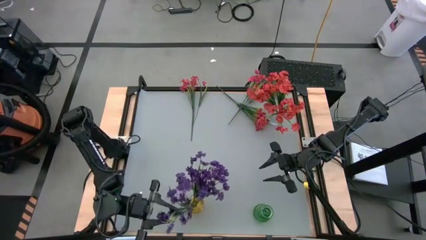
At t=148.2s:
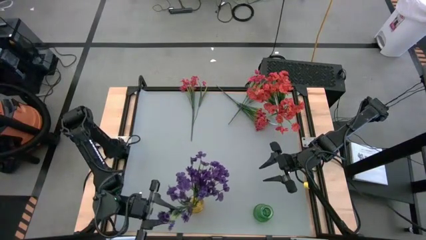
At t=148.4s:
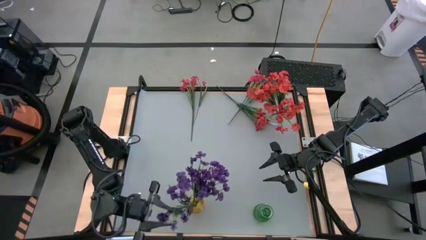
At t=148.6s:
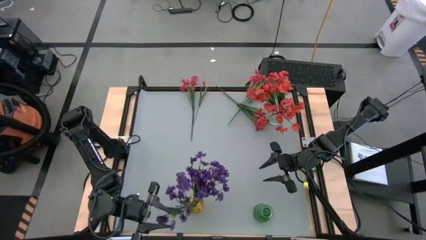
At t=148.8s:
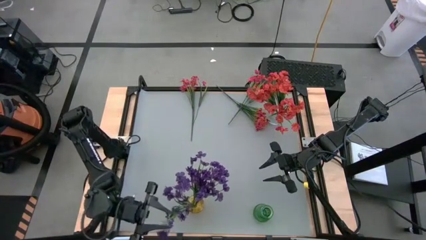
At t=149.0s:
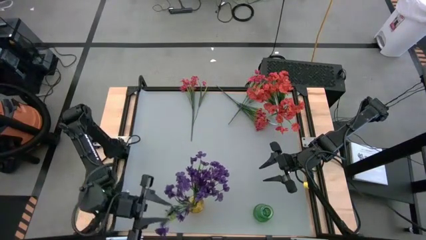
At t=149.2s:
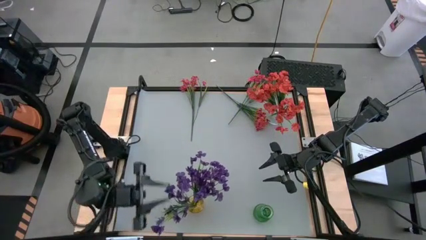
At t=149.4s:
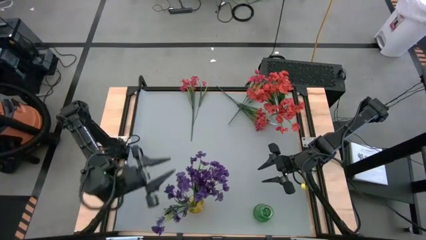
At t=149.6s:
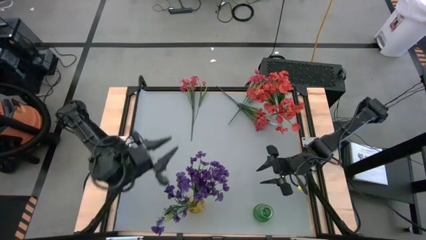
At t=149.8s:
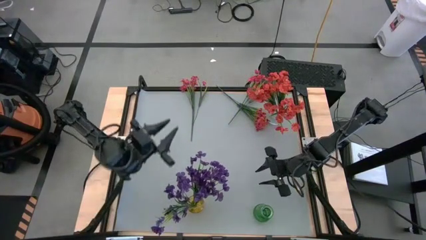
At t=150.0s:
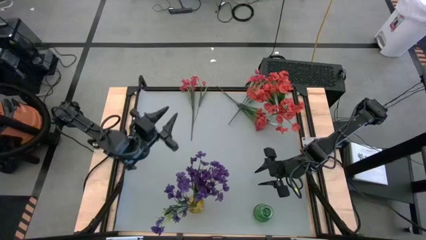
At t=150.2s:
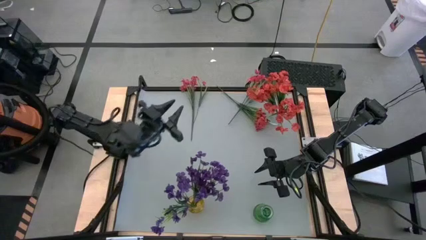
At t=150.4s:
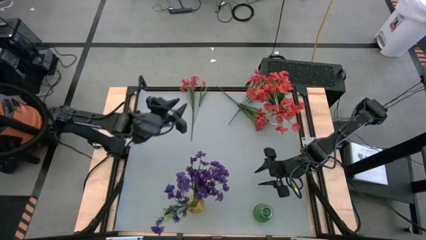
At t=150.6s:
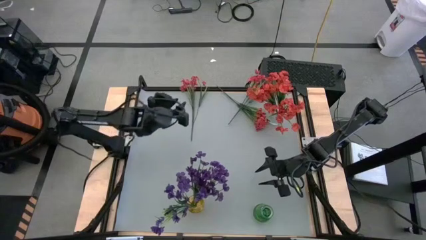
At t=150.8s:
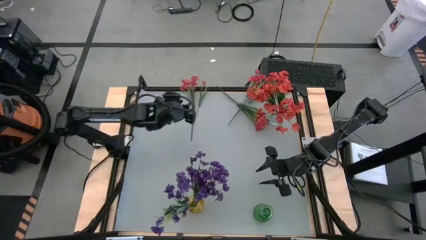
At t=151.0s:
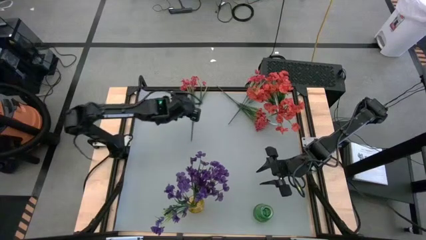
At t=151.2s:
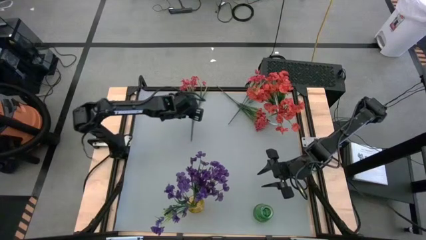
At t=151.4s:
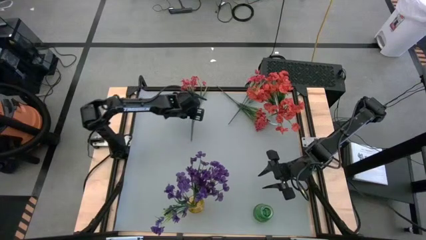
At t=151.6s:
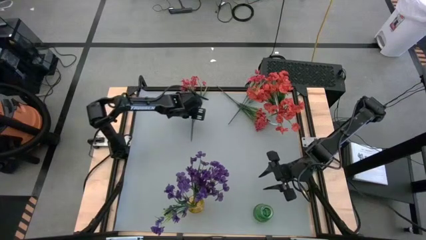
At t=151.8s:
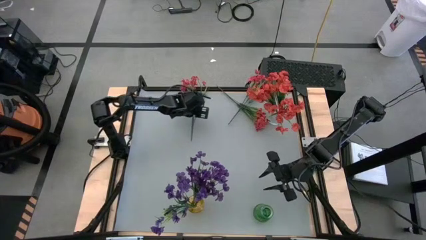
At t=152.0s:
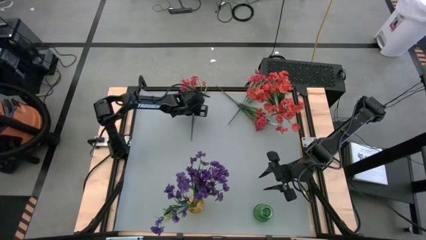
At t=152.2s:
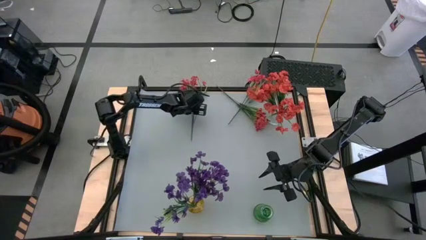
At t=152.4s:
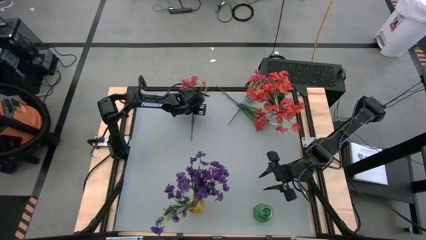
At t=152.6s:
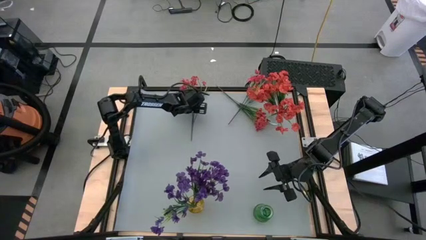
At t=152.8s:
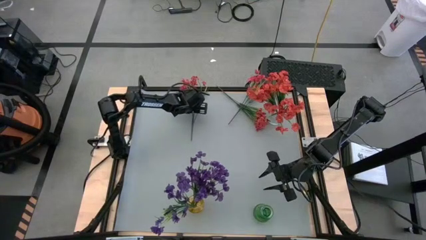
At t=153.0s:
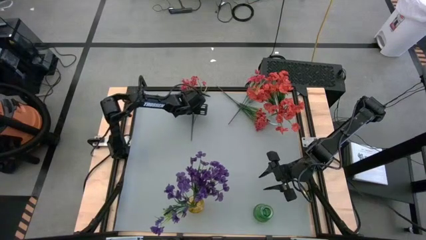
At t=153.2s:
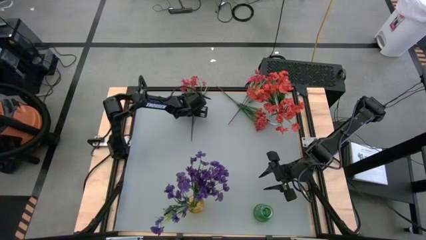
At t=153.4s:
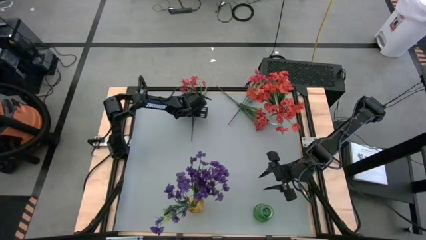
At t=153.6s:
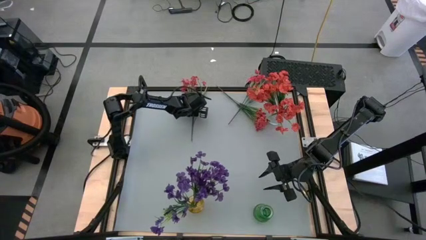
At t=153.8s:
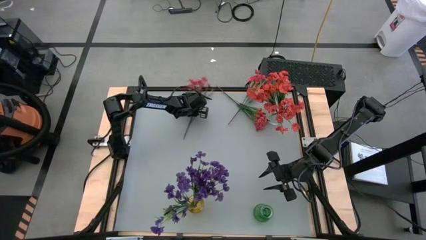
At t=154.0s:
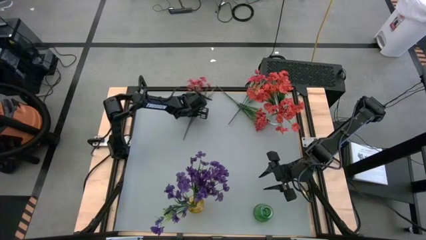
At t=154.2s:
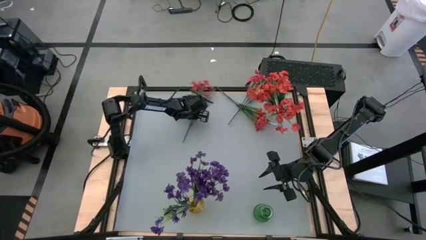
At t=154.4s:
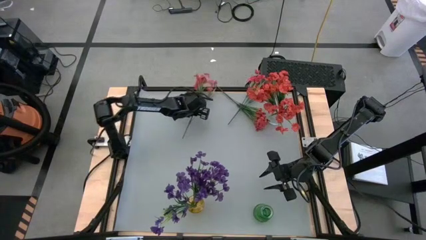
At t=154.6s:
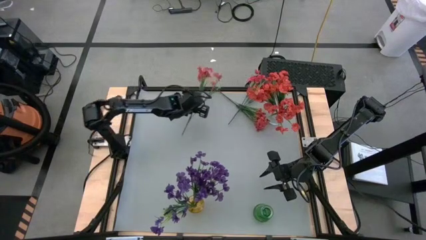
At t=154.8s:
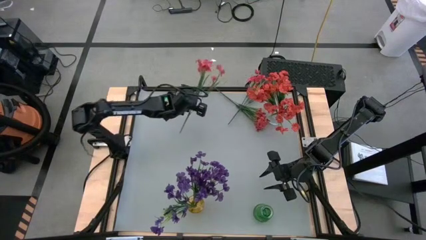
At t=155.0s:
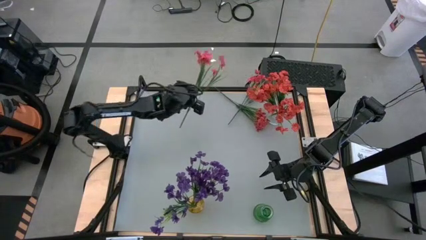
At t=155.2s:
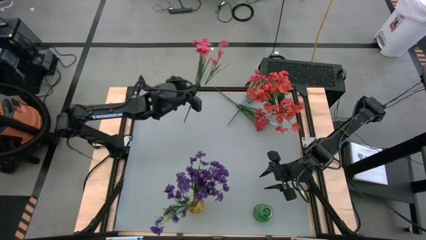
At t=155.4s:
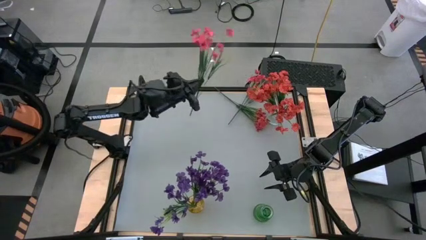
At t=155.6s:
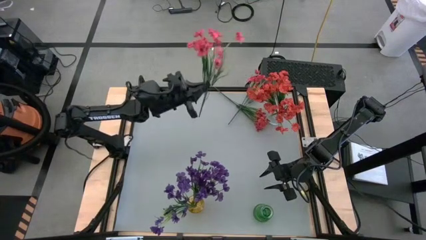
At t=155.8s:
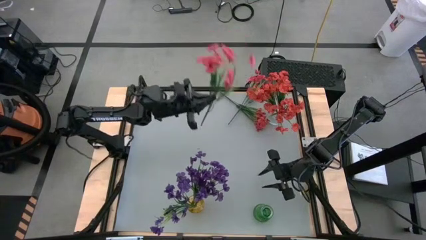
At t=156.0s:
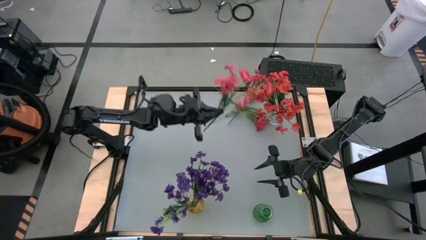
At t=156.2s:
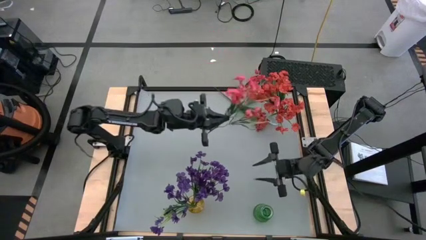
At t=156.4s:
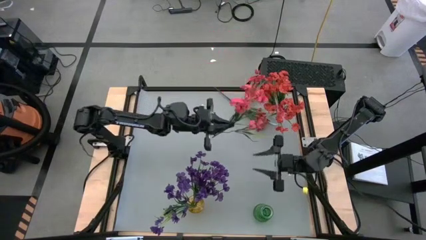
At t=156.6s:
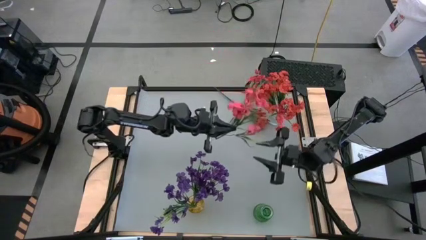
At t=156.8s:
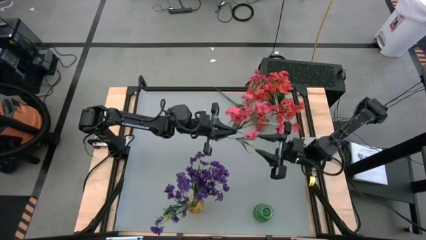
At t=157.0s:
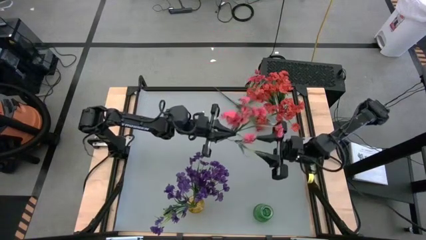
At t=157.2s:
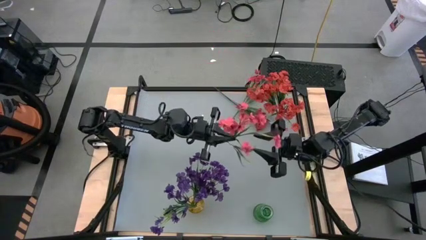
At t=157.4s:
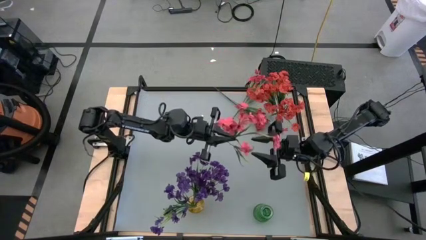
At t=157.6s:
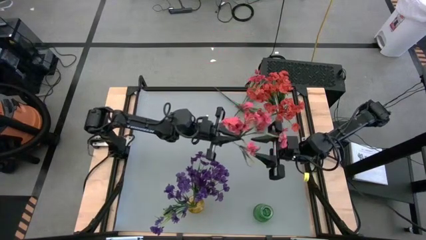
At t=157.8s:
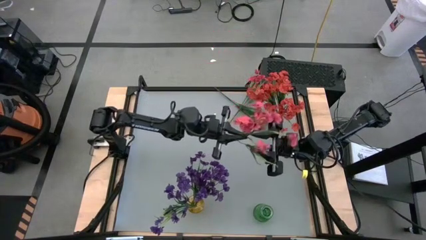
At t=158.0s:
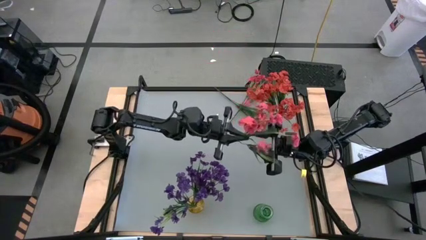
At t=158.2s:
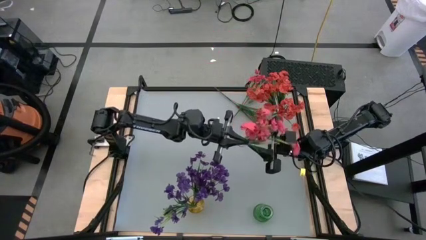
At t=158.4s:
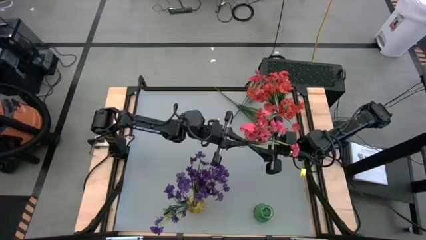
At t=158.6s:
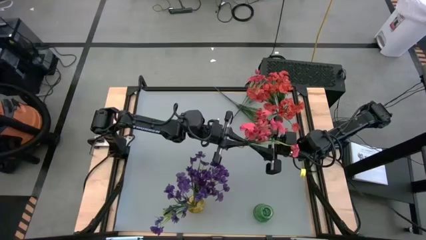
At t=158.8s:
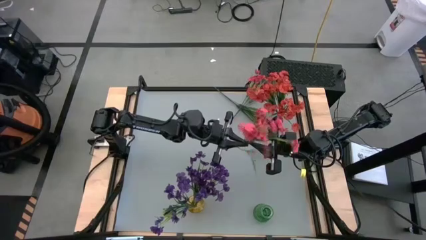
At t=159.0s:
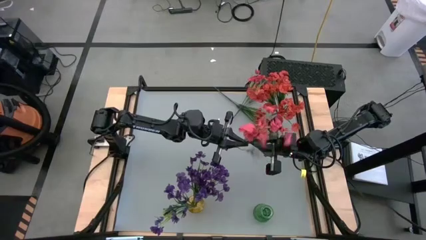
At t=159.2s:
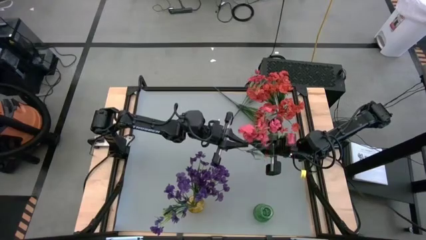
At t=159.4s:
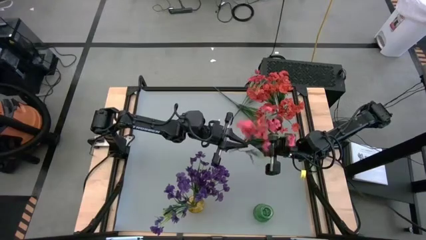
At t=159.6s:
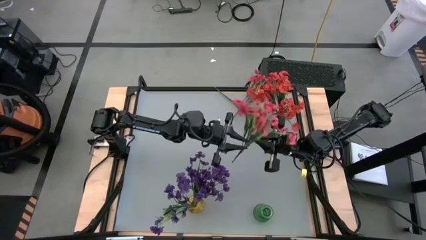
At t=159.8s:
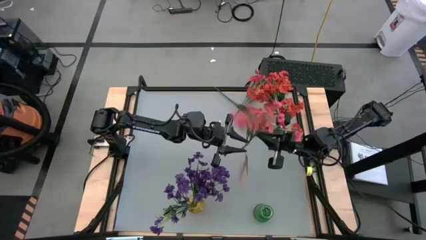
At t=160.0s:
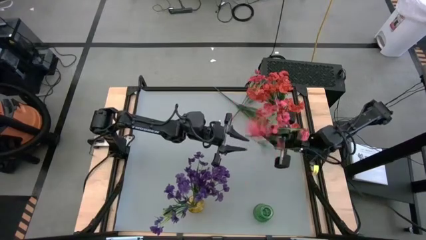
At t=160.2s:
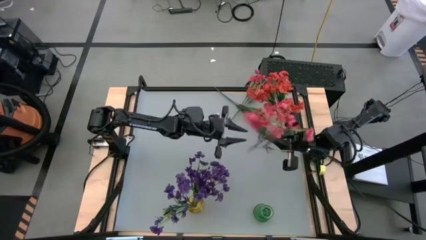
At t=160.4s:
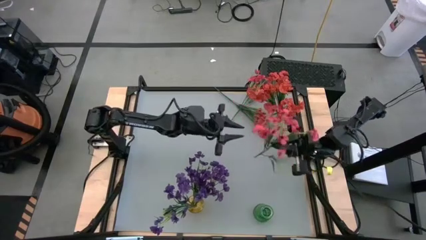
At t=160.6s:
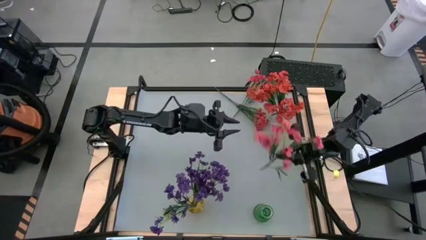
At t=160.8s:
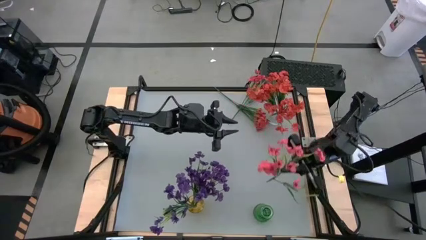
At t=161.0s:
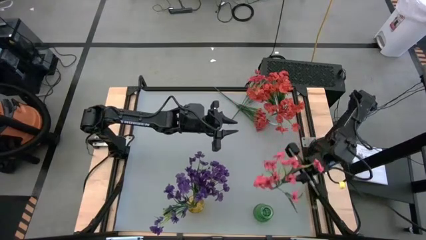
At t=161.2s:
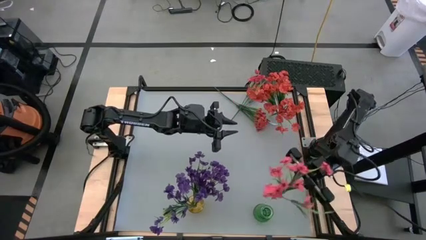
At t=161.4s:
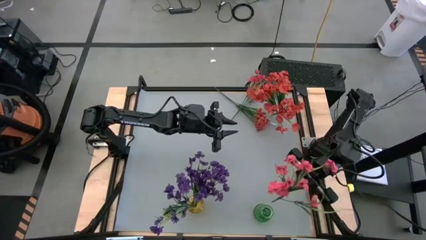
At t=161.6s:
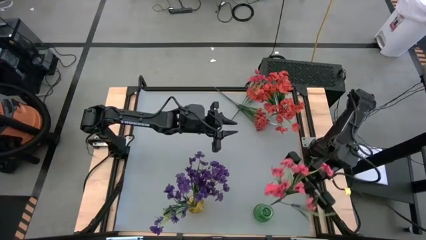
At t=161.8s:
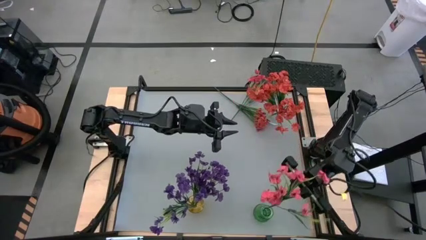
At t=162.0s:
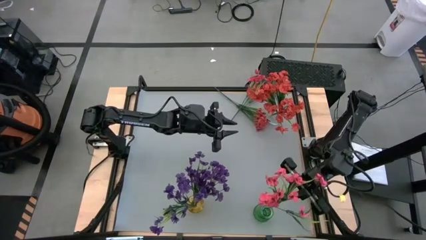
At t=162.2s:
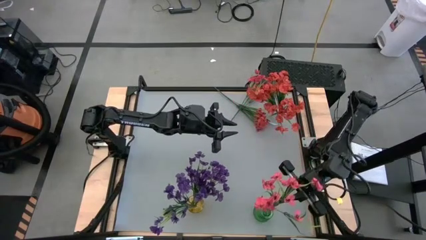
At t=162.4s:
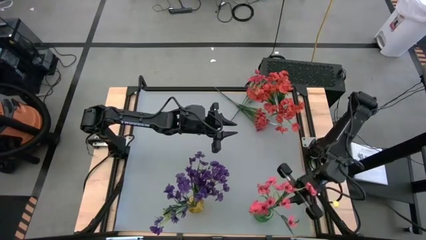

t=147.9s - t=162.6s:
Task: Sort flowers into vase by color
Put the left pink flower into the green transparent vase

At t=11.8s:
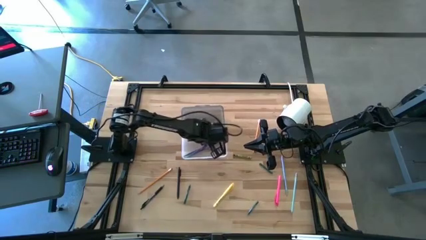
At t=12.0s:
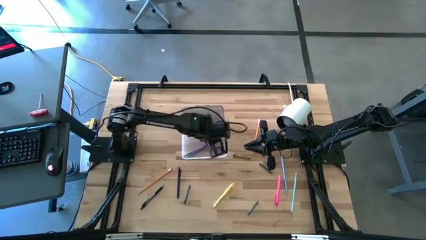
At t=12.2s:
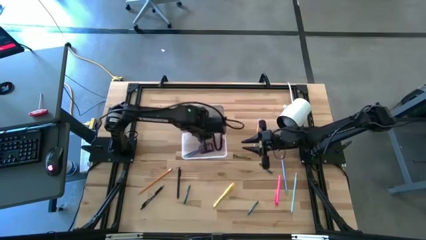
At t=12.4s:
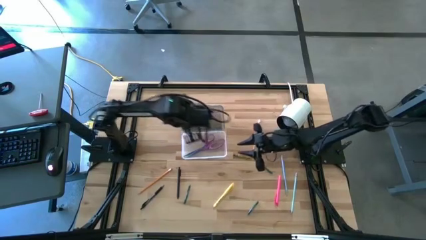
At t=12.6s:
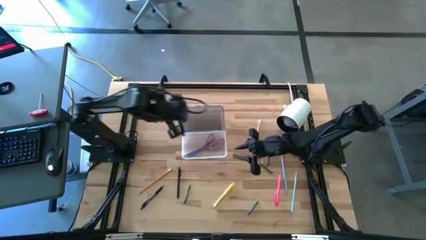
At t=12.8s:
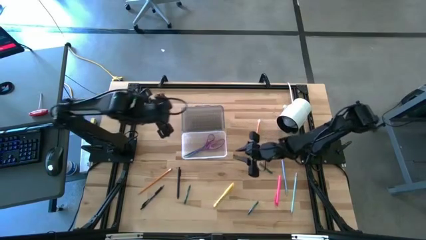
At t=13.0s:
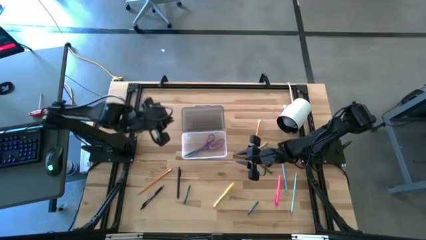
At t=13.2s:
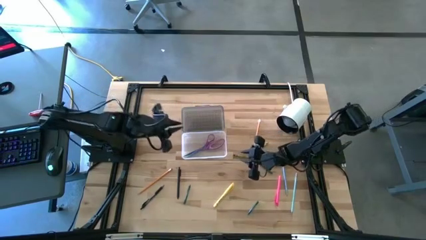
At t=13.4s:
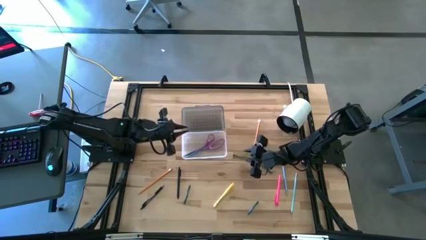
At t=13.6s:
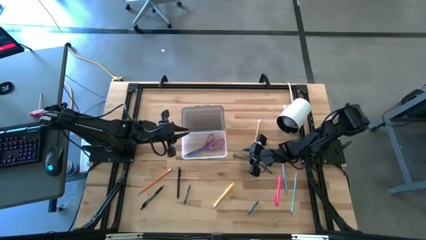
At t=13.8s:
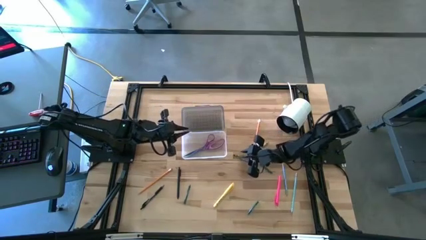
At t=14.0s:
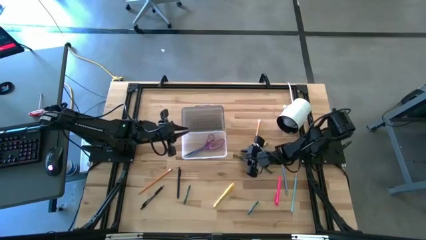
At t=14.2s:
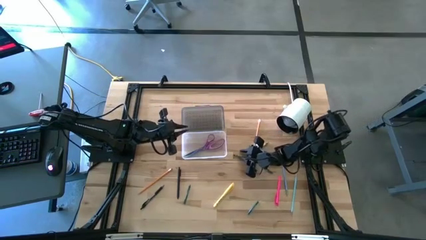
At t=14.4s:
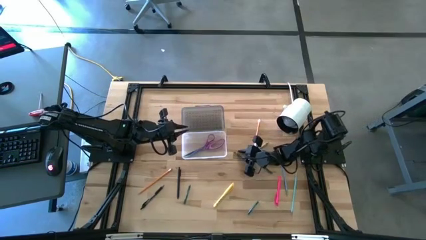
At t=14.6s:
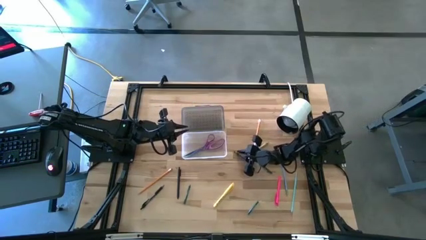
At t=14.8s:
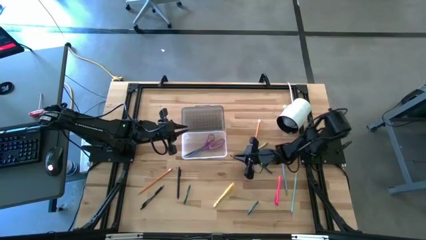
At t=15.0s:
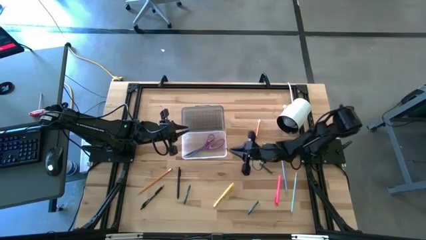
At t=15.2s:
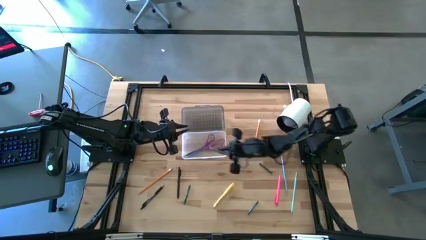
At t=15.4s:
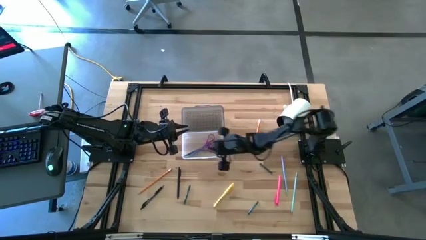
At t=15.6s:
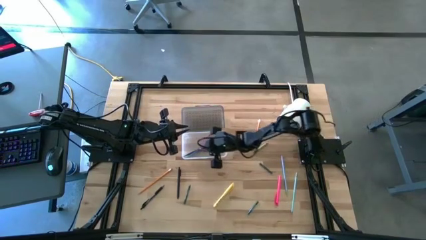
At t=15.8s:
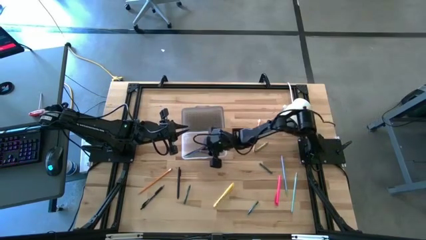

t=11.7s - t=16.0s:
Task: Pick & place school supplies into a supply box
Put the left green crayon into the black box
